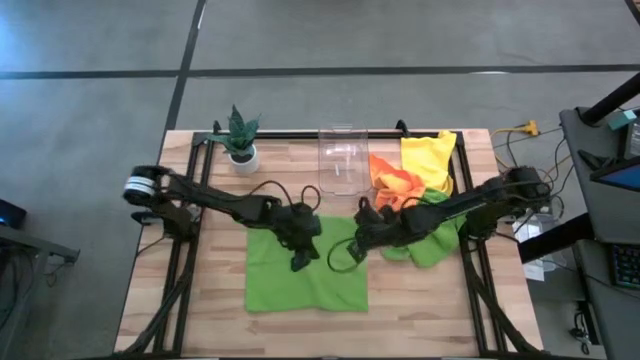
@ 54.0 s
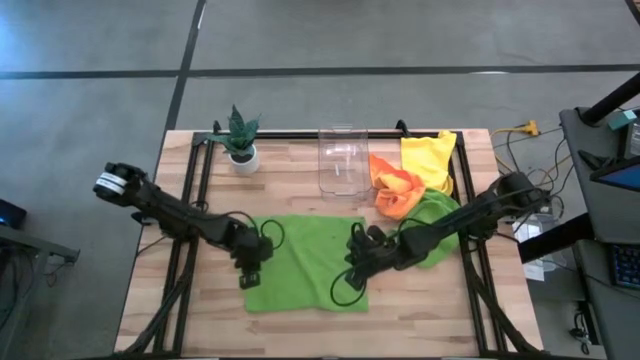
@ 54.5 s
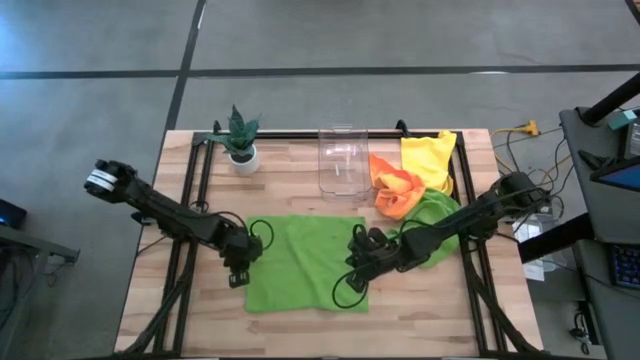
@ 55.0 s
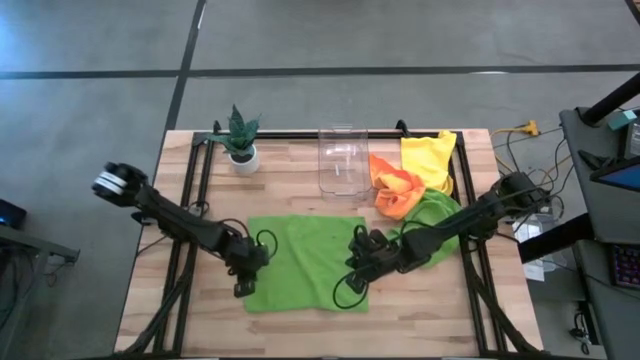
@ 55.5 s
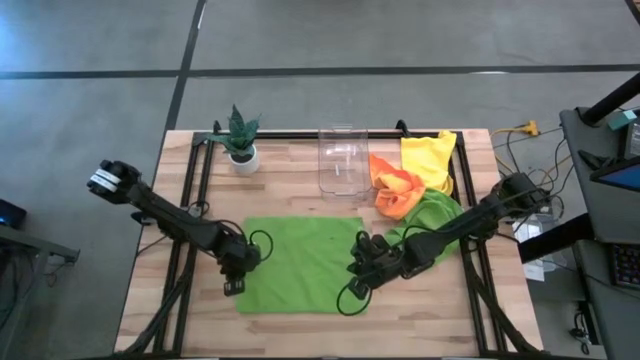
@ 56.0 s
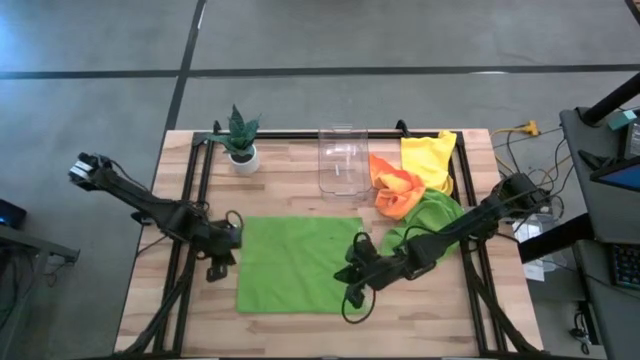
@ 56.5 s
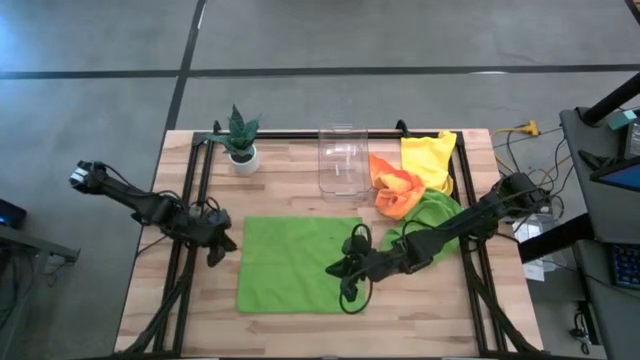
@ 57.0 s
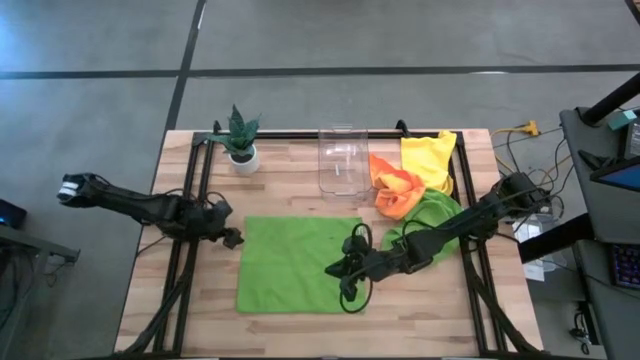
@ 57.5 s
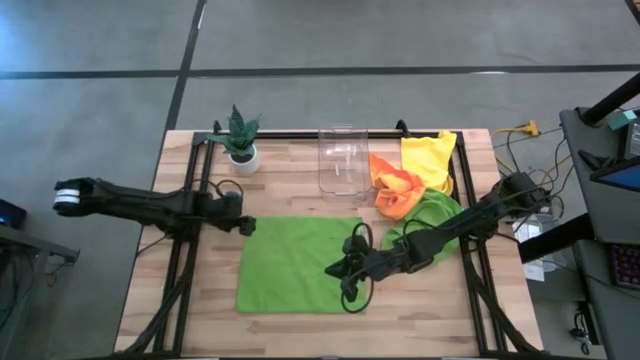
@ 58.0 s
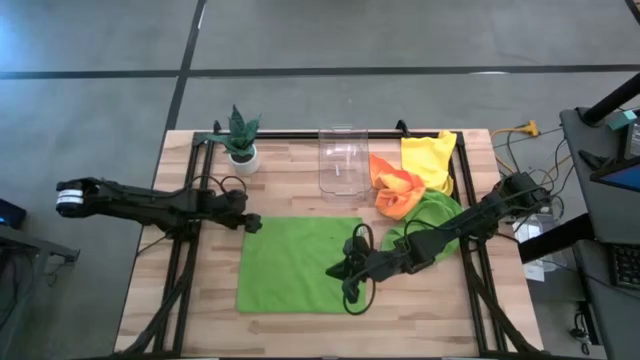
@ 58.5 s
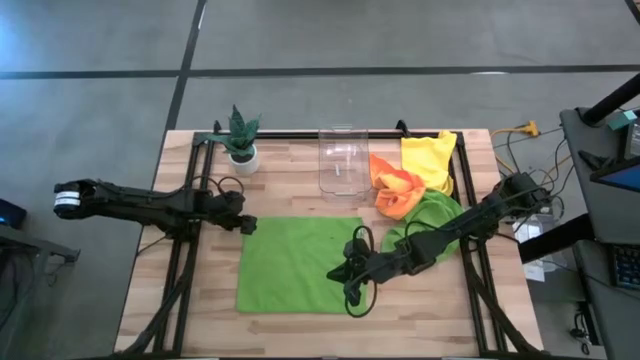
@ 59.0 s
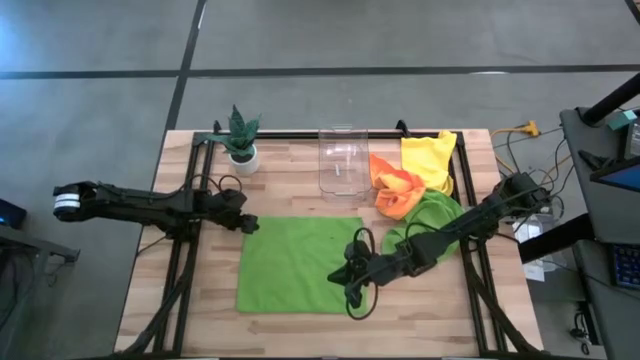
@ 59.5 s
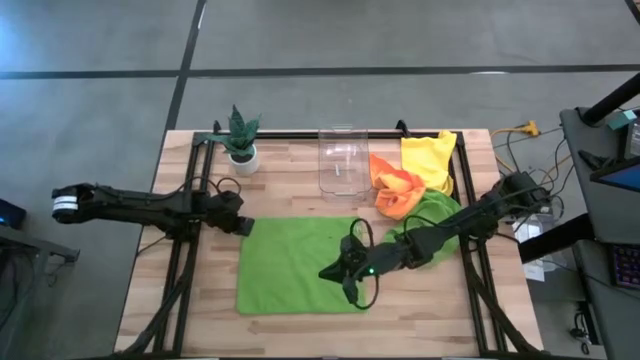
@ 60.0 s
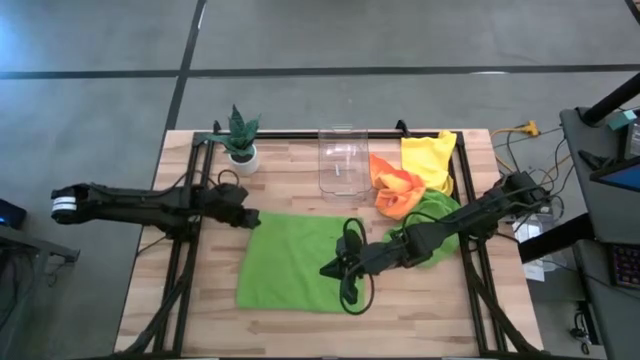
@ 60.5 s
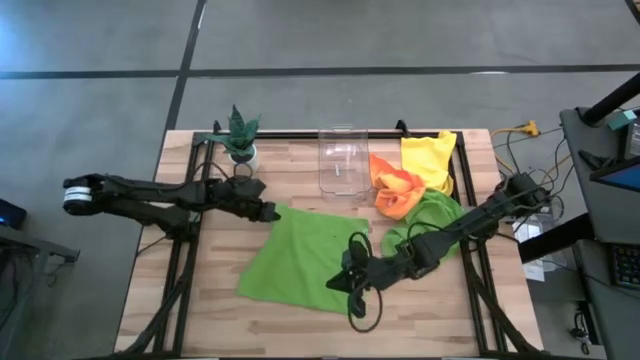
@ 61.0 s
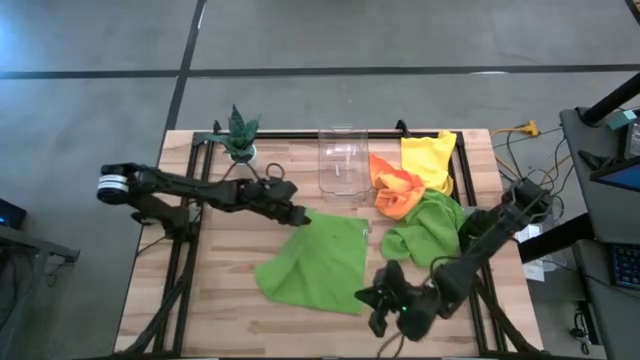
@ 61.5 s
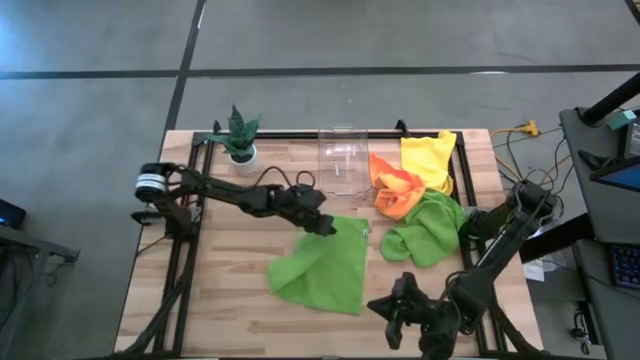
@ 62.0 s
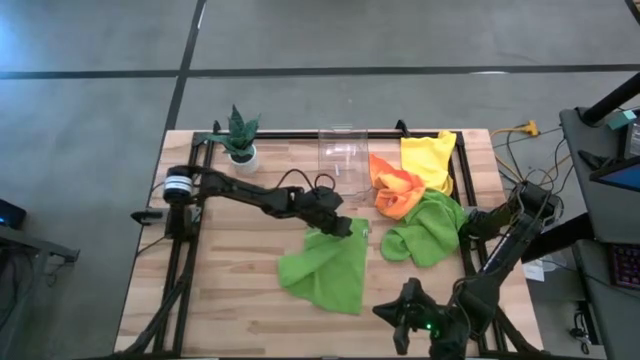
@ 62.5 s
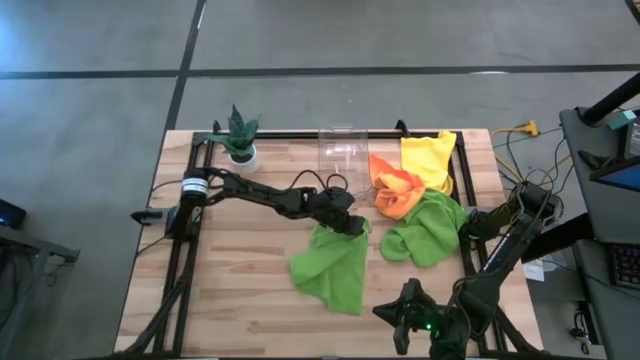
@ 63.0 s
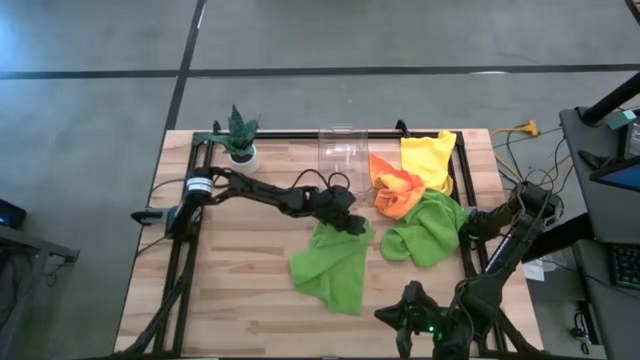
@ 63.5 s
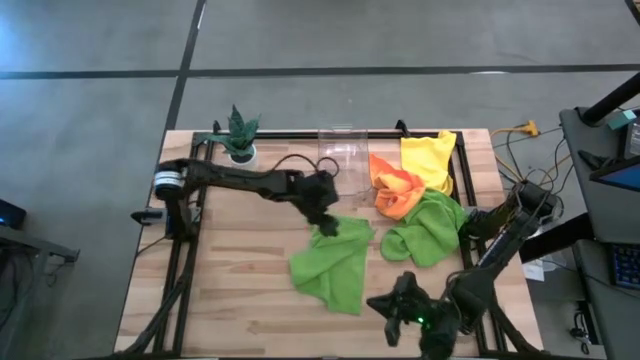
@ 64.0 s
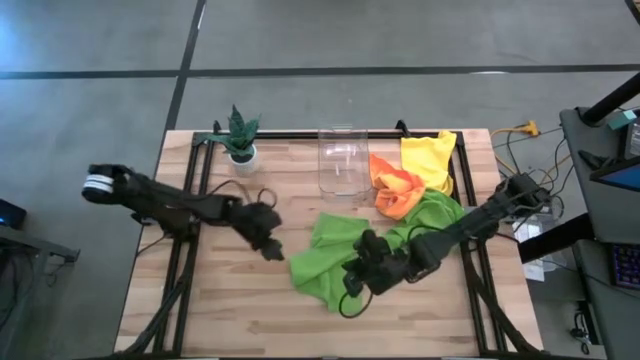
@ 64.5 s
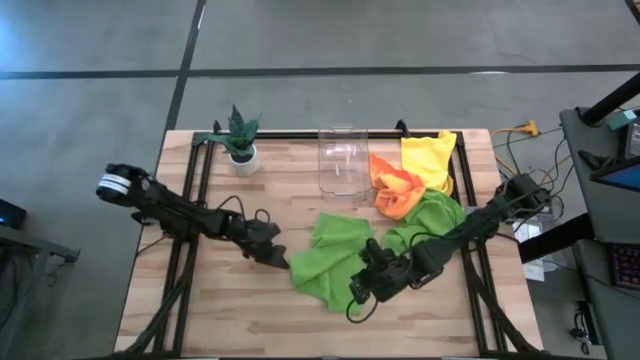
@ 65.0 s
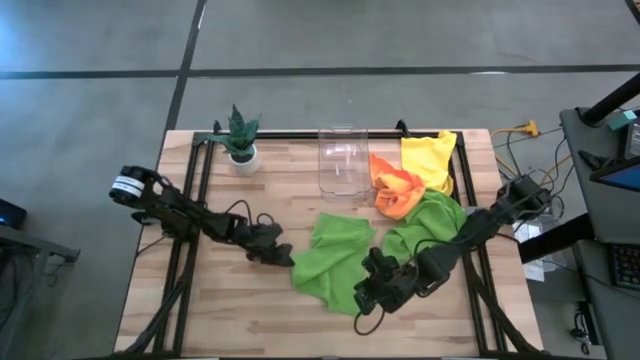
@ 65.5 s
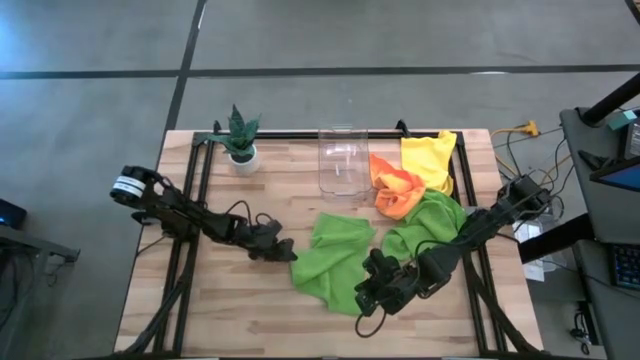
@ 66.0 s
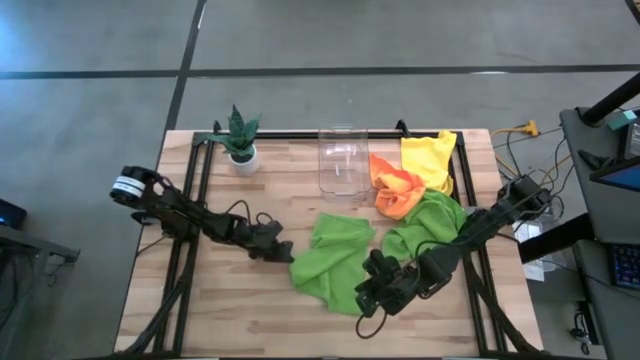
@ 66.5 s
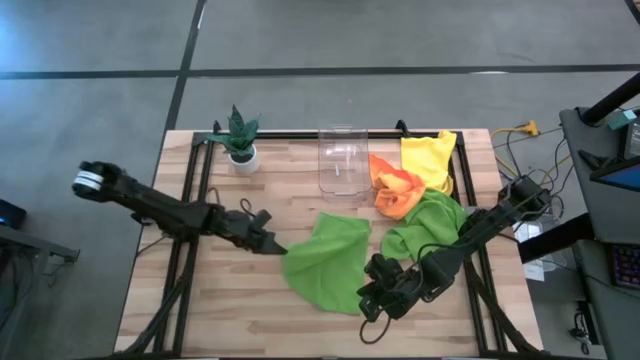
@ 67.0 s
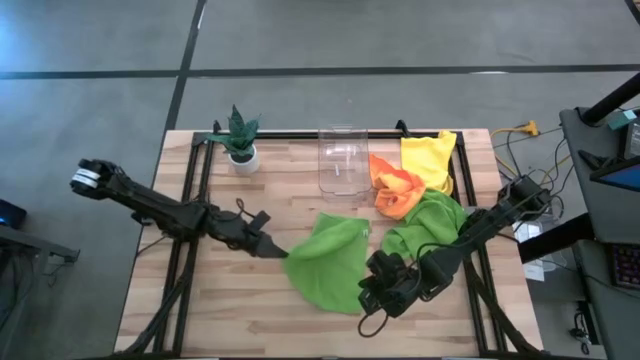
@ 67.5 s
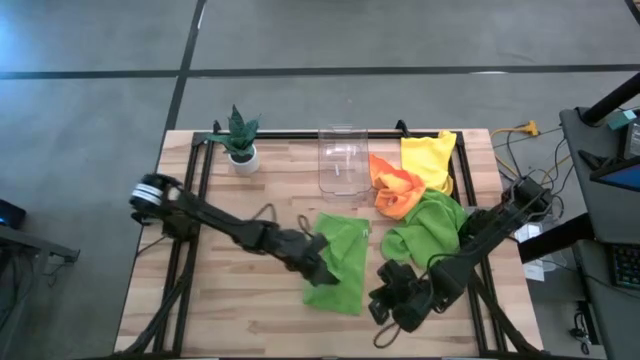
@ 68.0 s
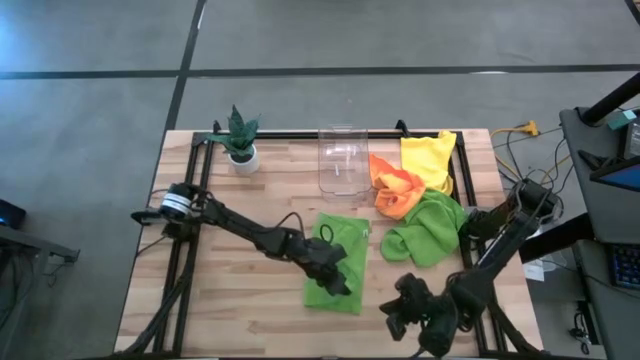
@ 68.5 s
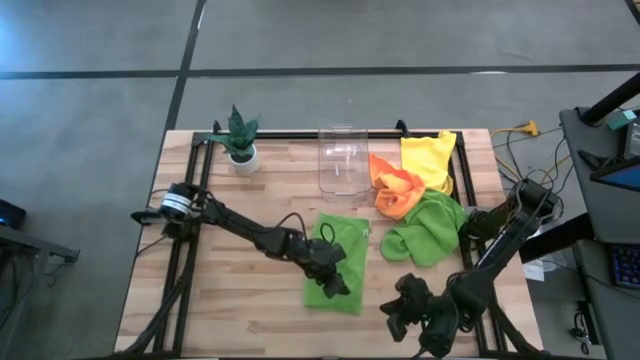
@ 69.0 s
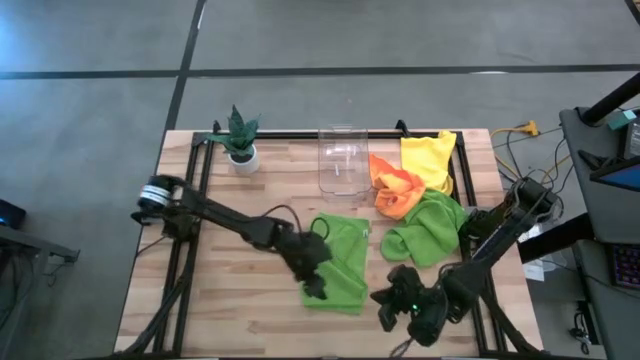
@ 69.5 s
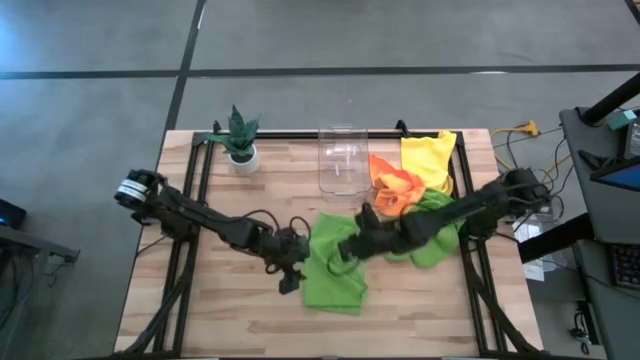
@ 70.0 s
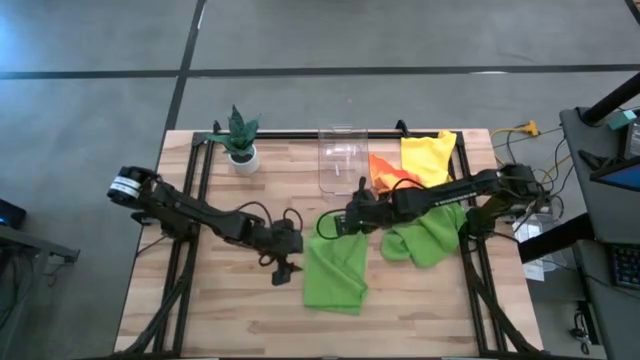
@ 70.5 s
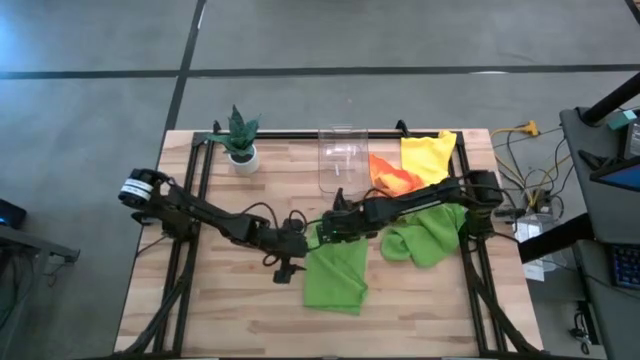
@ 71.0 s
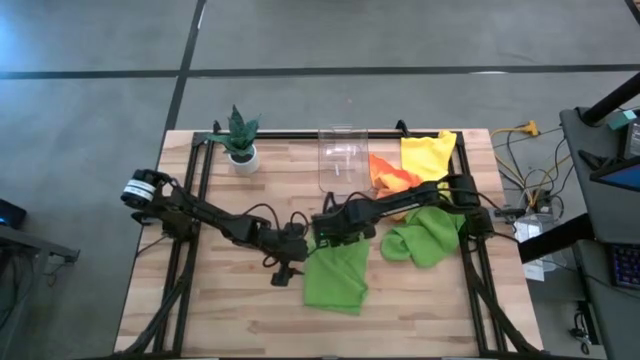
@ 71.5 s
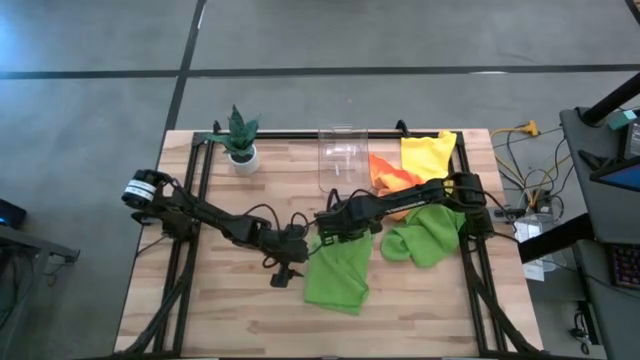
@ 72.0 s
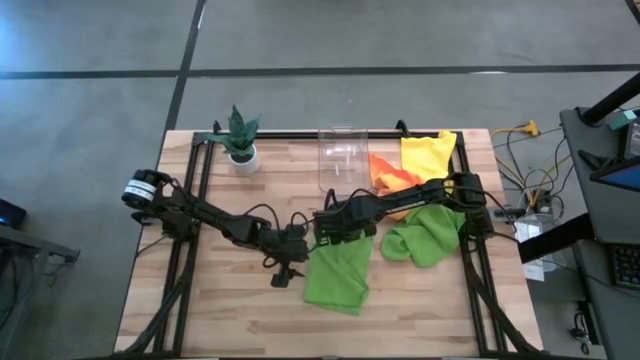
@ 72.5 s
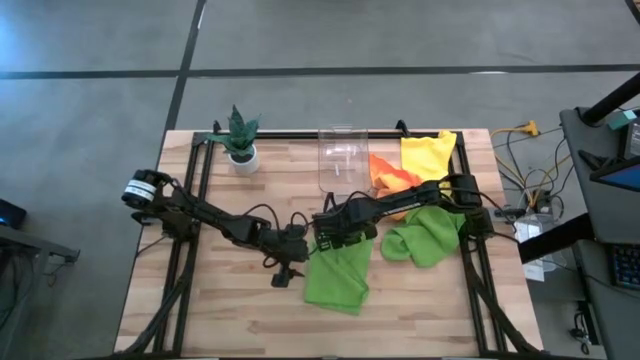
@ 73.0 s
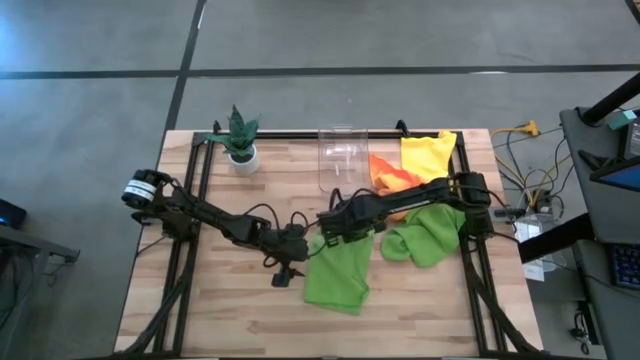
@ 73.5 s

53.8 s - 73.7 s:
Task: Fold microfiber towels
Fold the top green towel
